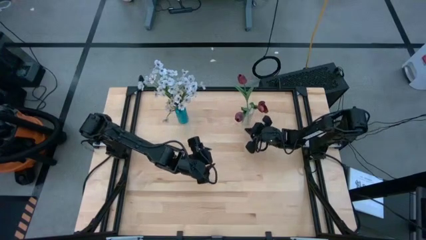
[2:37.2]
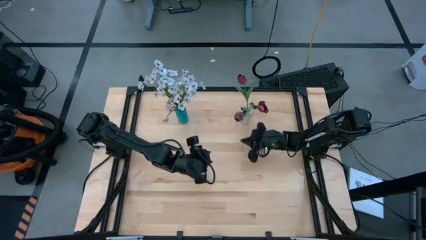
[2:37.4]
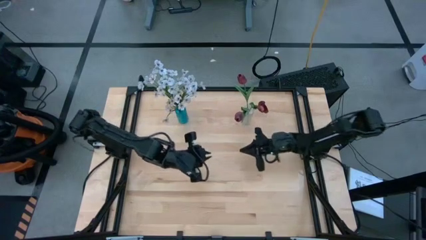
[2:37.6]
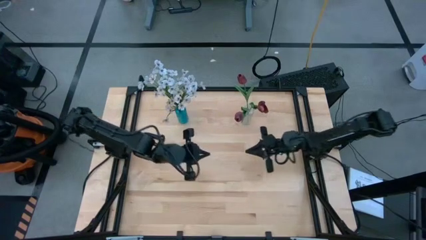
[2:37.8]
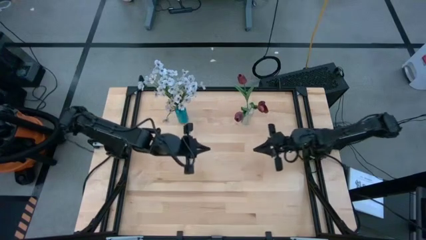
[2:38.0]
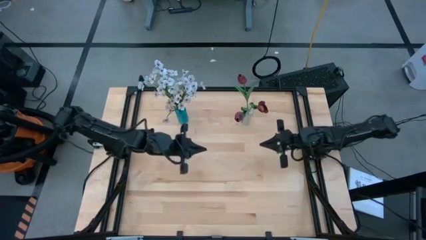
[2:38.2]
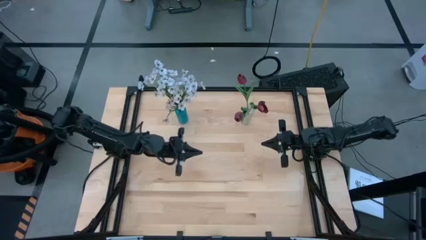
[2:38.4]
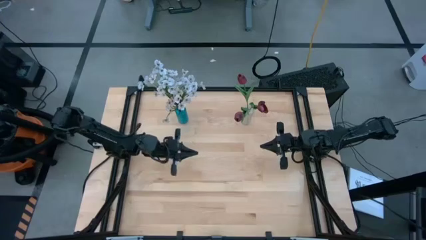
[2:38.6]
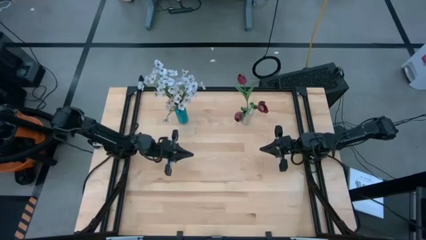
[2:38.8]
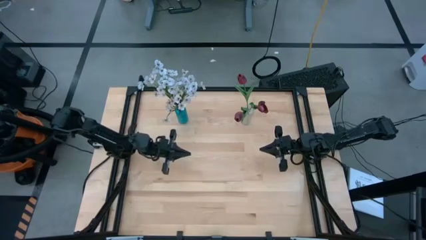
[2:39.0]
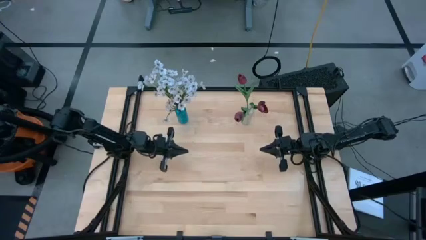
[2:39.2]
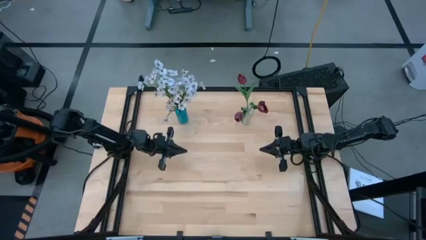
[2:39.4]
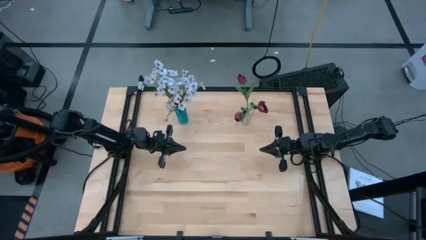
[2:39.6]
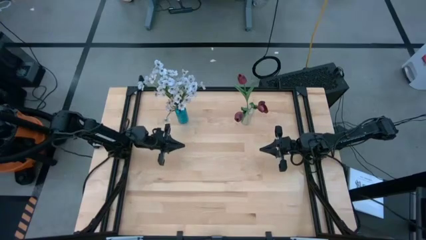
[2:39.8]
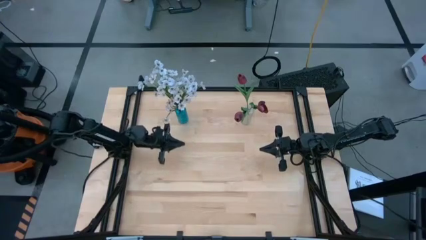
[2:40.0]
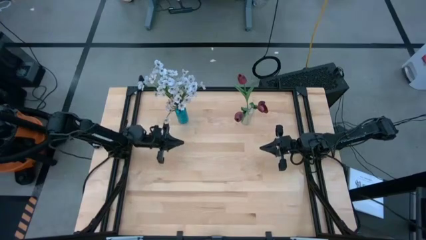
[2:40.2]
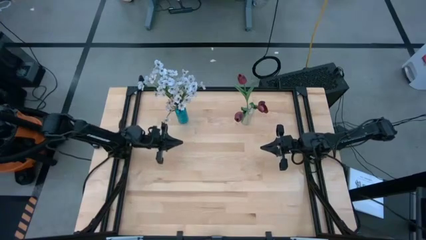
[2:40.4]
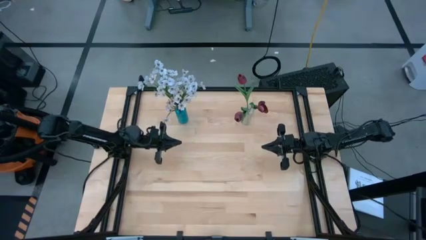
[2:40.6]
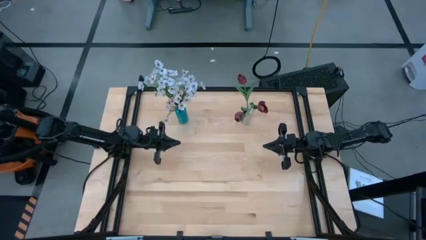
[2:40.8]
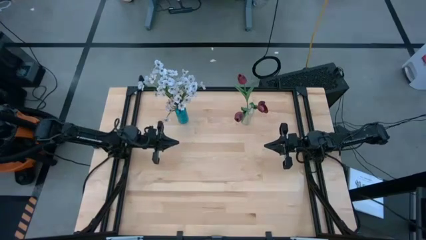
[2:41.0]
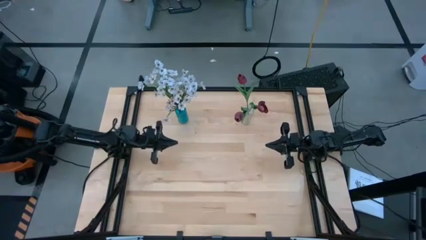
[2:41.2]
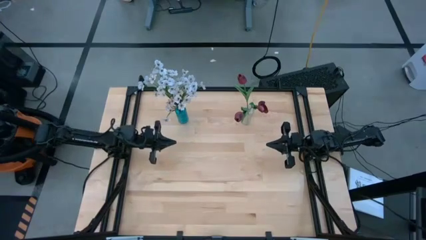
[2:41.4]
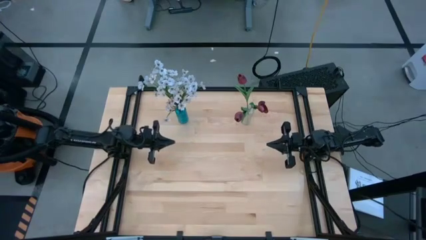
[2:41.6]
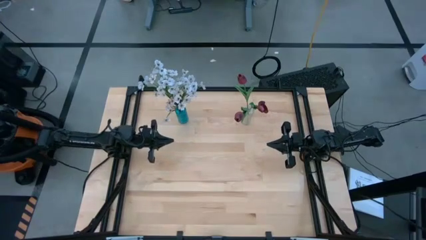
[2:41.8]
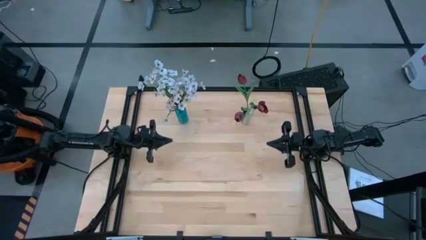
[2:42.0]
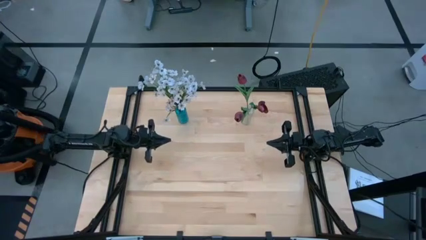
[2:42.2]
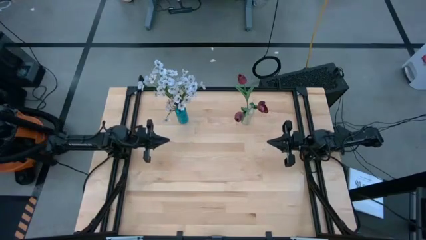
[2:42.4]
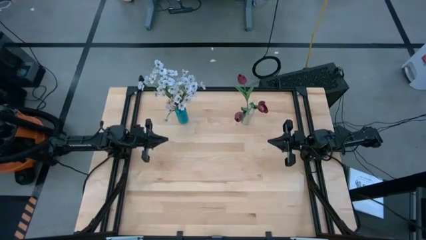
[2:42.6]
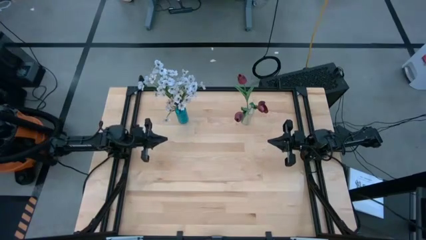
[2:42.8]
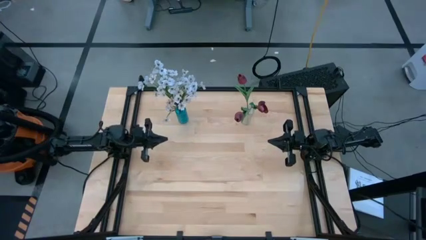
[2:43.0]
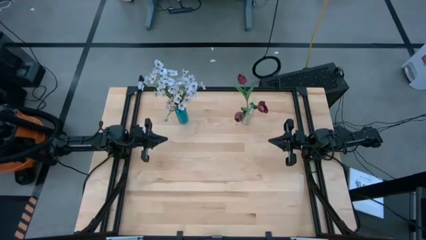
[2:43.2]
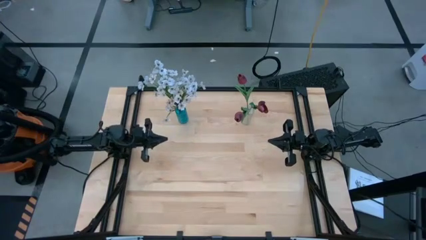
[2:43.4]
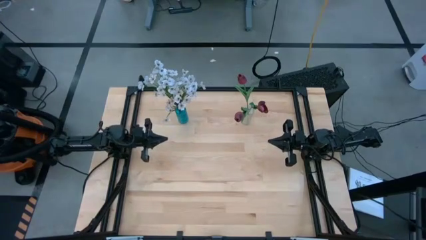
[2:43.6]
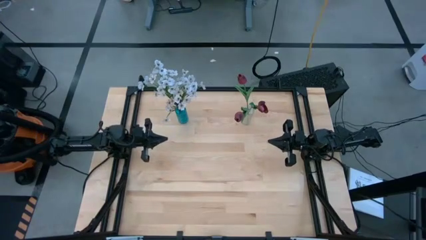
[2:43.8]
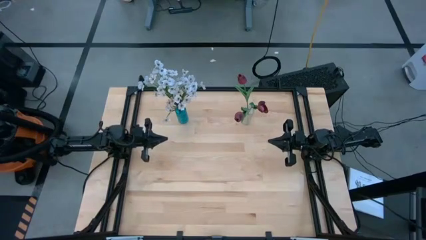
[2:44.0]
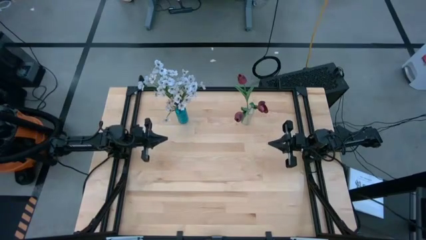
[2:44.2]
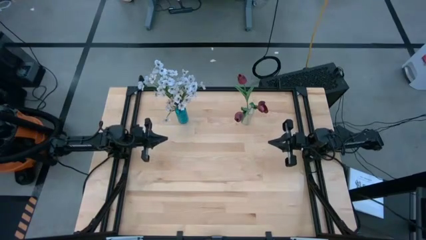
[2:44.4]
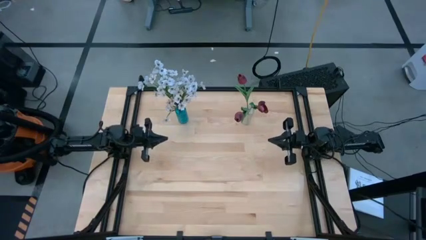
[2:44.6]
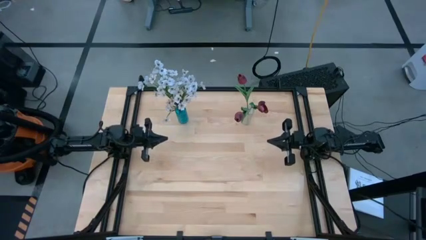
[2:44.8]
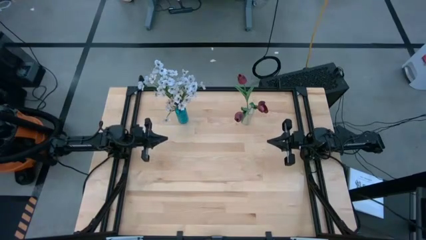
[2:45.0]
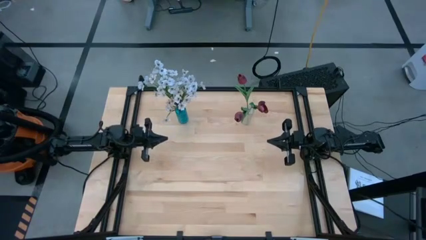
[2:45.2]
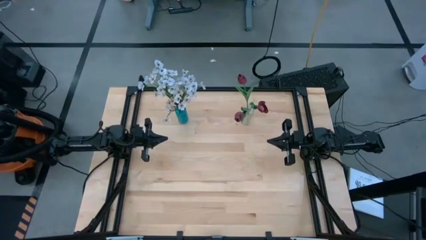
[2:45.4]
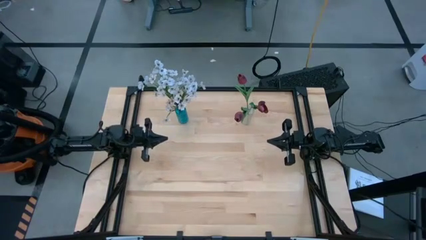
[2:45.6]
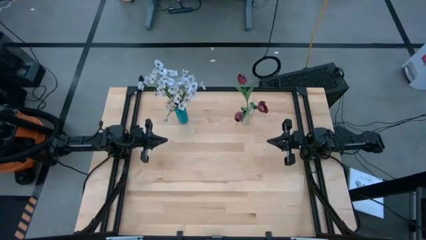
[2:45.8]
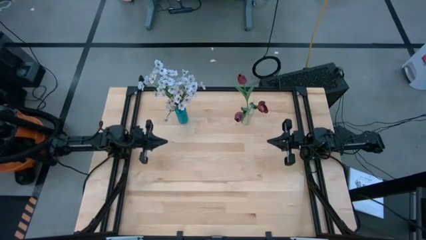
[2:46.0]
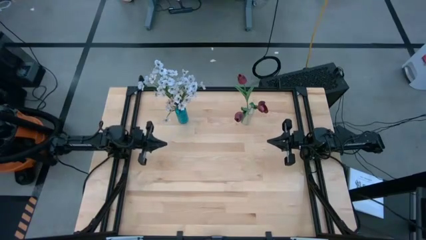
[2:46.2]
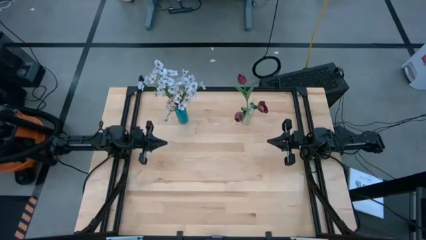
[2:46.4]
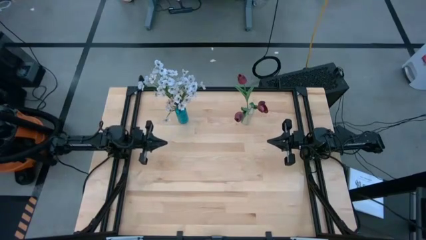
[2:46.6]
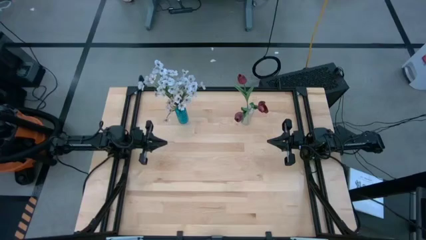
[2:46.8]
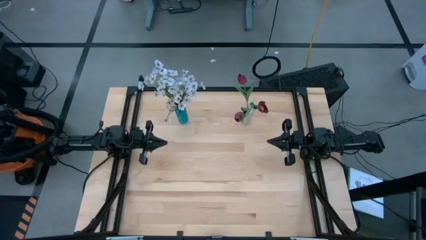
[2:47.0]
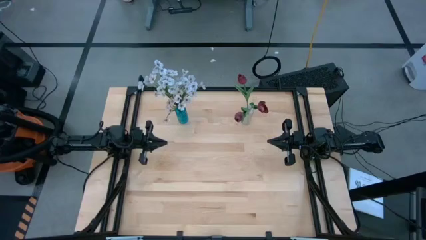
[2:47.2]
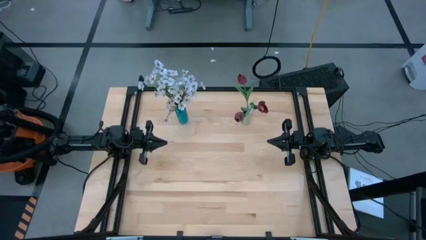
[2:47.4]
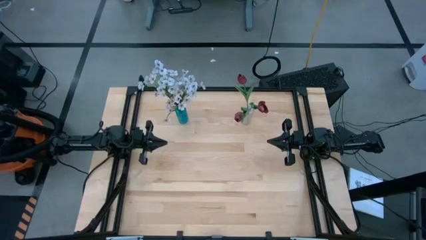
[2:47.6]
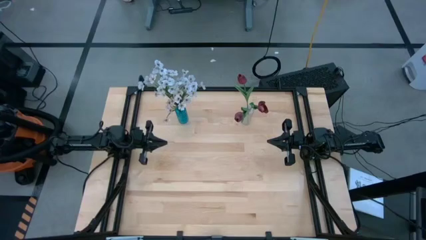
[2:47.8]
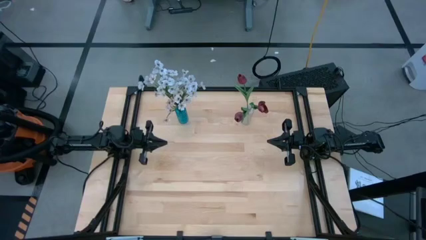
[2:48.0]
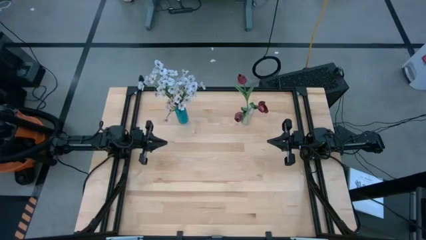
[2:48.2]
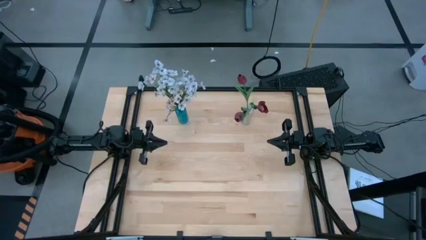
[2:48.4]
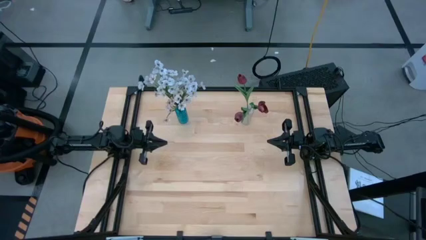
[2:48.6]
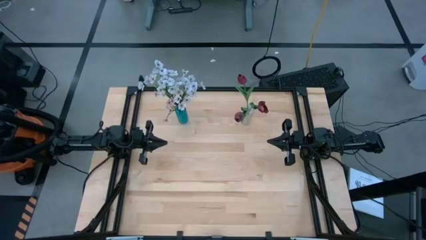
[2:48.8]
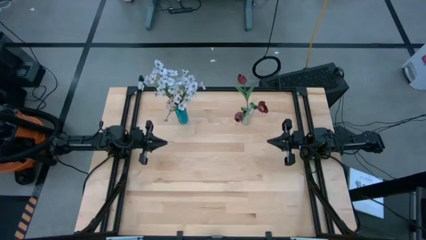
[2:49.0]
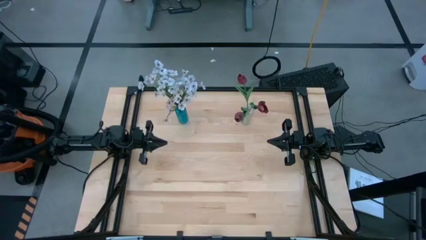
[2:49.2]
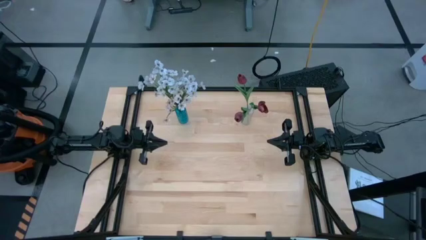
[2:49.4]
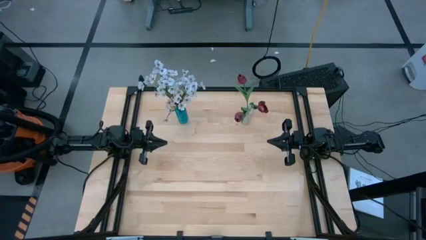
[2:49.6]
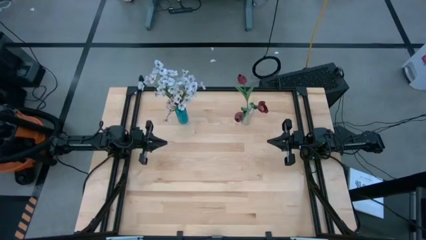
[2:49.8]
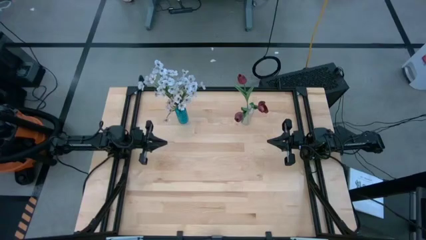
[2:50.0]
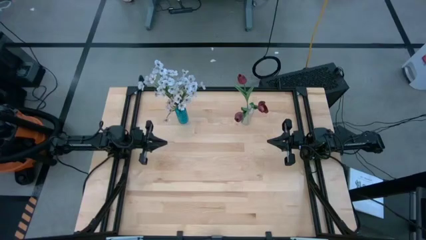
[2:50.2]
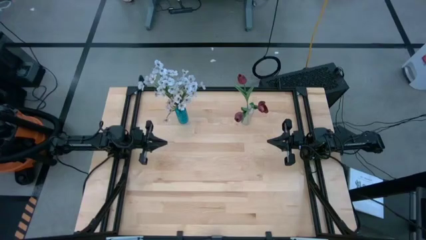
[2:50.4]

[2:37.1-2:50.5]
Task: Sort flowers into vase by color
Return to Home Position

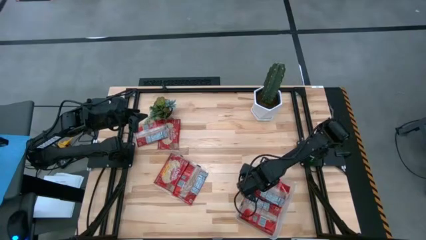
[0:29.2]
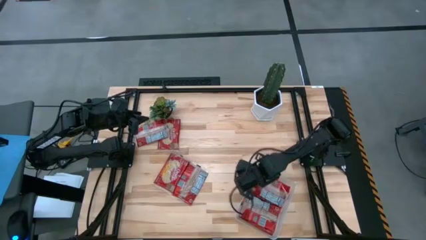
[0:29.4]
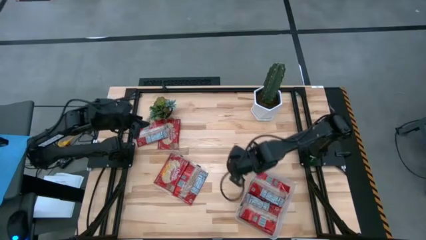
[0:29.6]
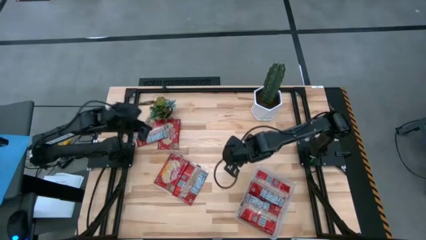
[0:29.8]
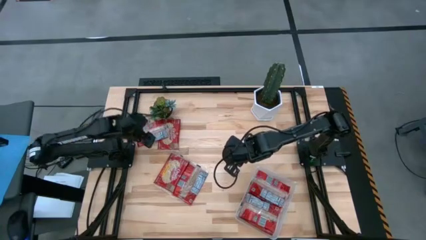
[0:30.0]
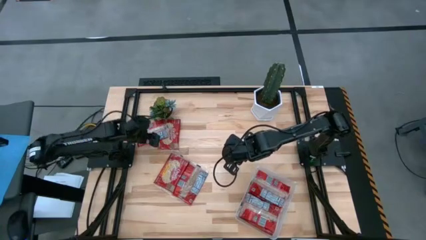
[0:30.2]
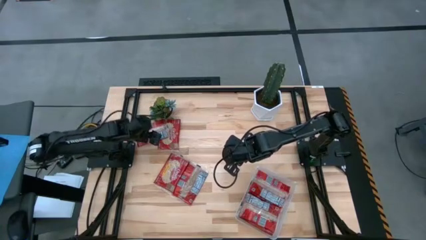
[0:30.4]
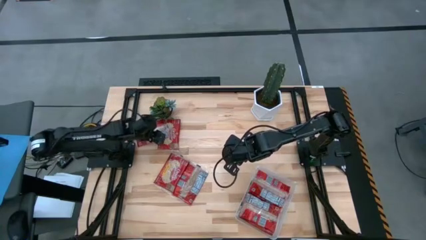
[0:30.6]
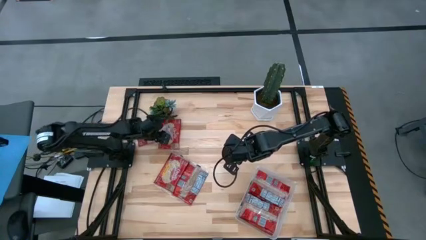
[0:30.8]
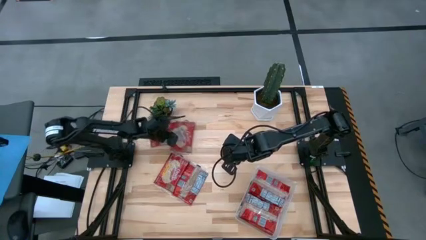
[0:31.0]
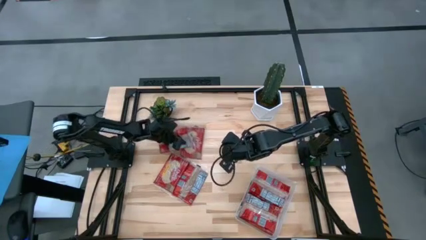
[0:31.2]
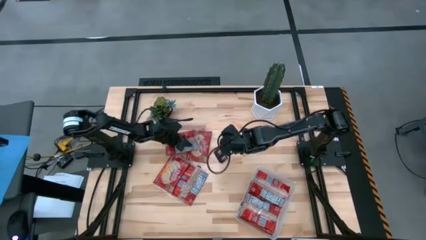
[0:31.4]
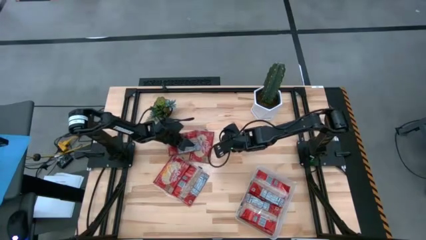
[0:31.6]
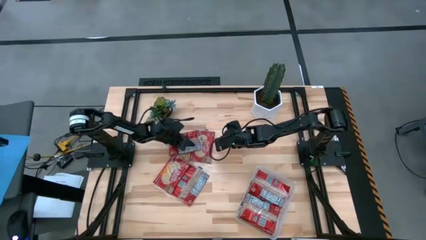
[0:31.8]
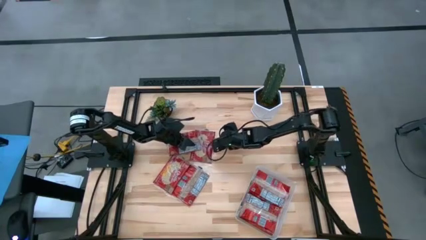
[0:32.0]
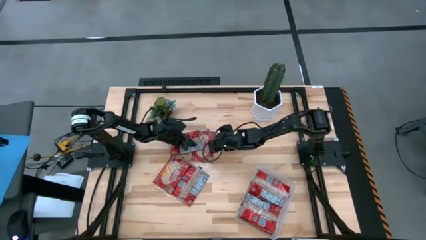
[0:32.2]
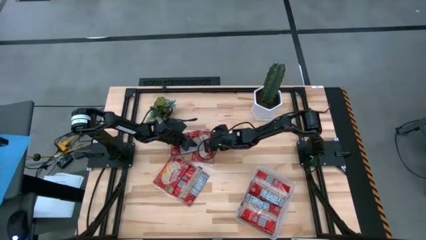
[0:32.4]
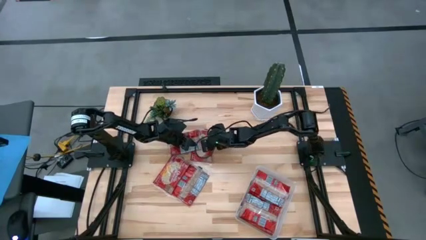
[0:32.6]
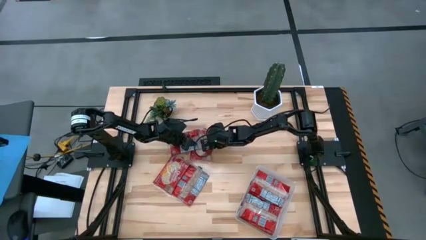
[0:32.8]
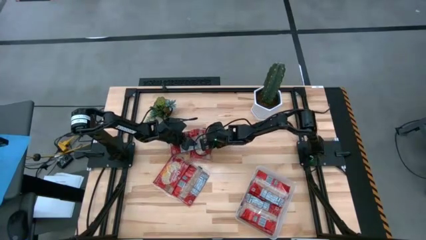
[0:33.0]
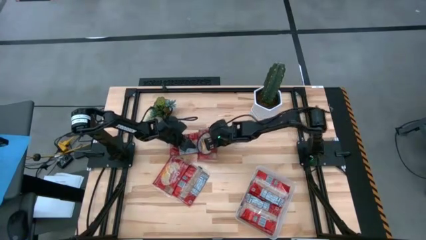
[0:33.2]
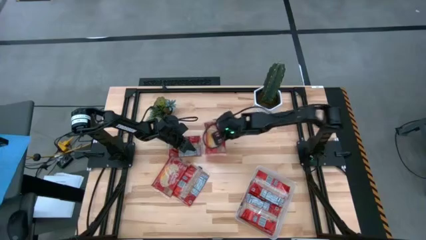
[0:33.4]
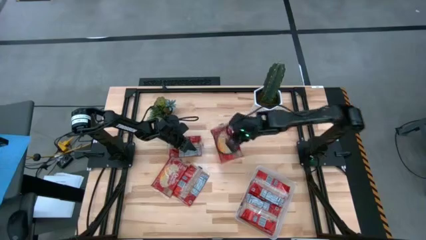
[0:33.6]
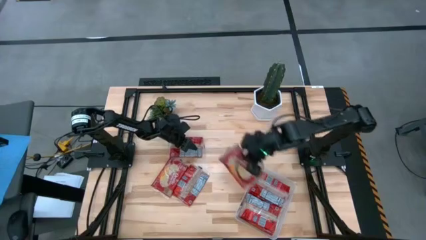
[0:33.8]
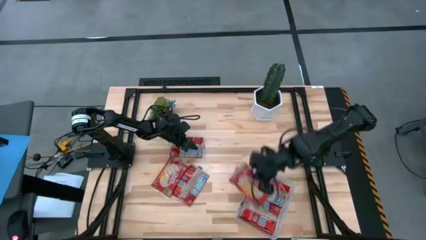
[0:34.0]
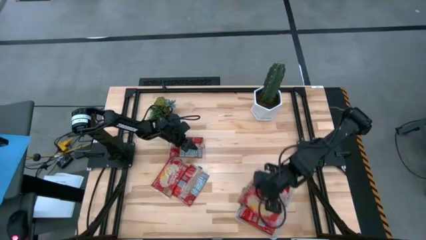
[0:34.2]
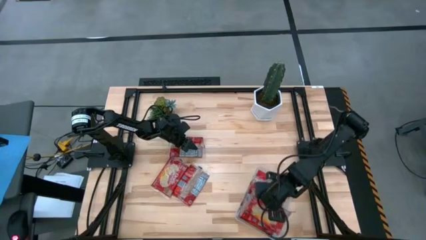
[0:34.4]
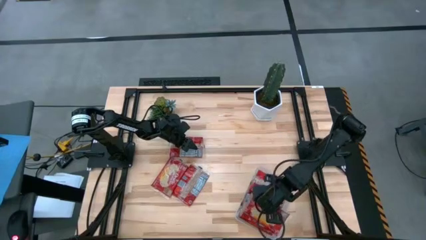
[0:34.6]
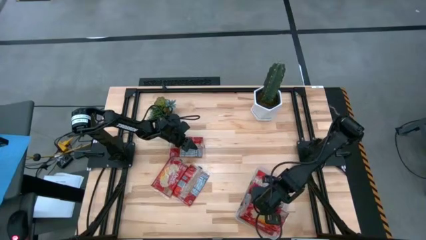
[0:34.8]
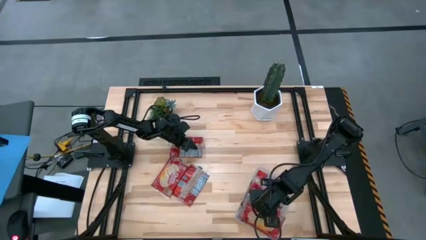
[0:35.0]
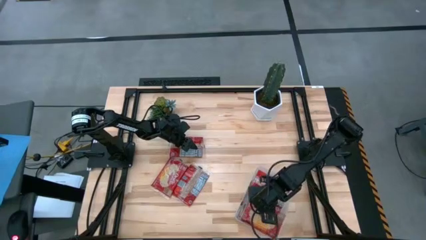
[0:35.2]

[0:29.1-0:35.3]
Task: Sort popcorn bags into baskets
Put the red popcorn bag into the transparent bin
